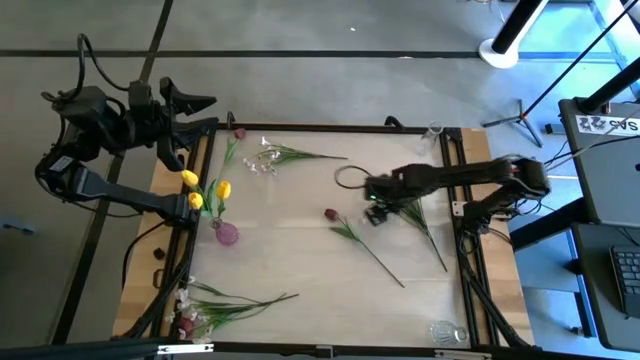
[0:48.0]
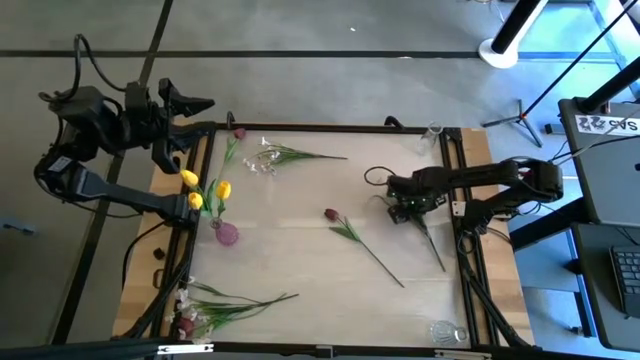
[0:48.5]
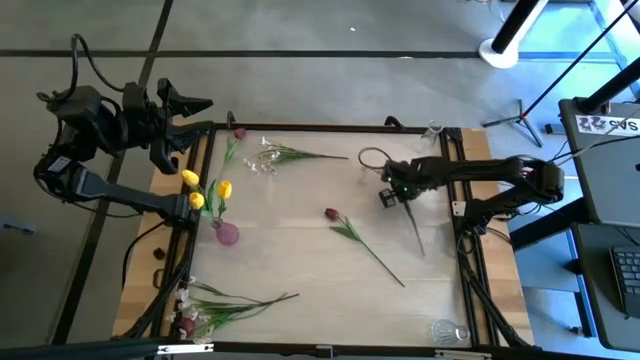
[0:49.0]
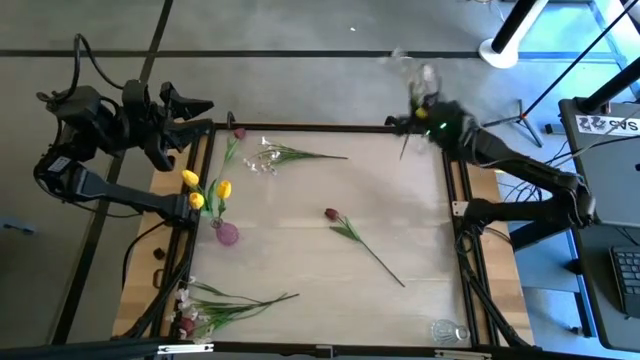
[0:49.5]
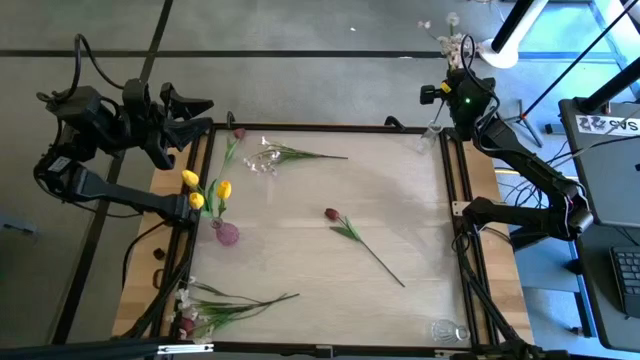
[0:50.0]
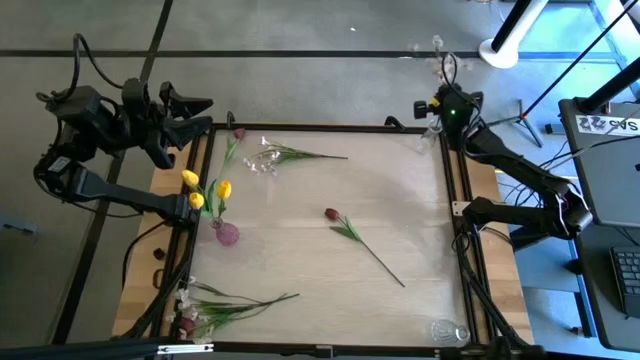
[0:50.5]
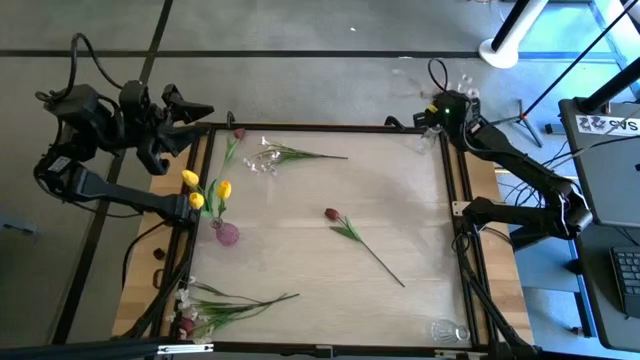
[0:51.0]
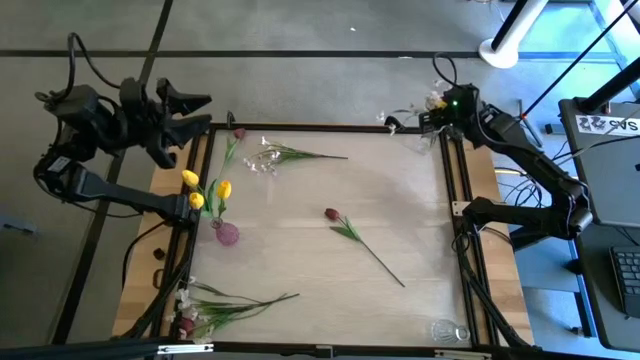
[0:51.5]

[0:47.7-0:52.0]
Task: Sort flowers into vase by color
Put the middle right white flowers into the top transparent flower vase

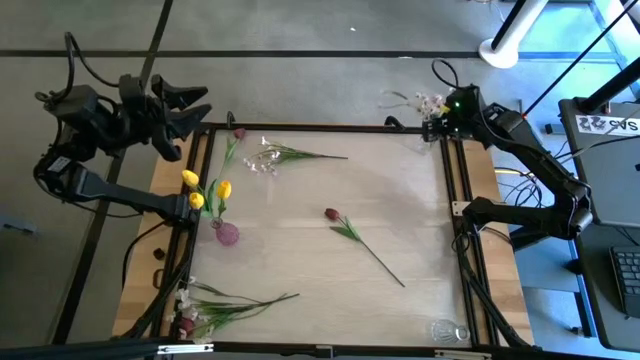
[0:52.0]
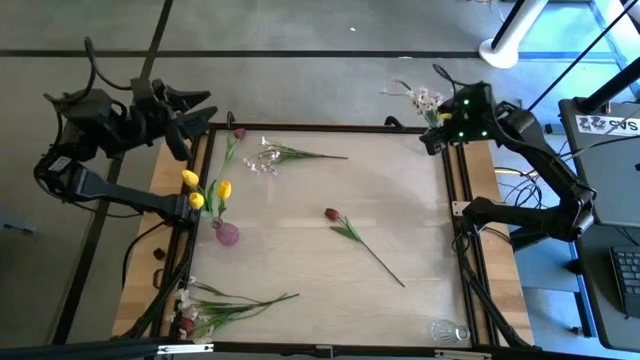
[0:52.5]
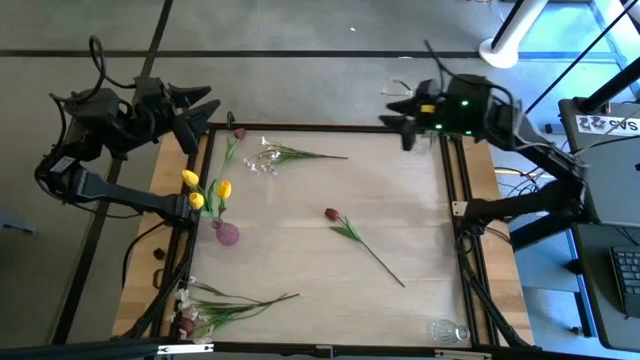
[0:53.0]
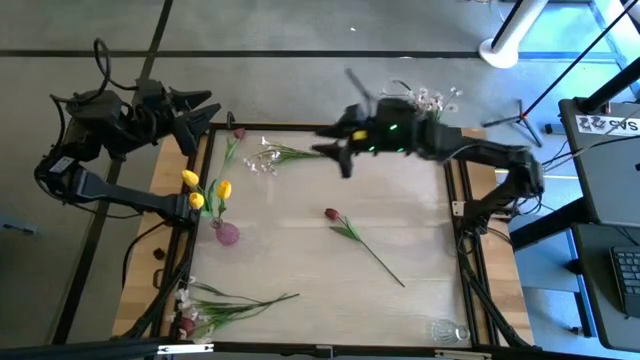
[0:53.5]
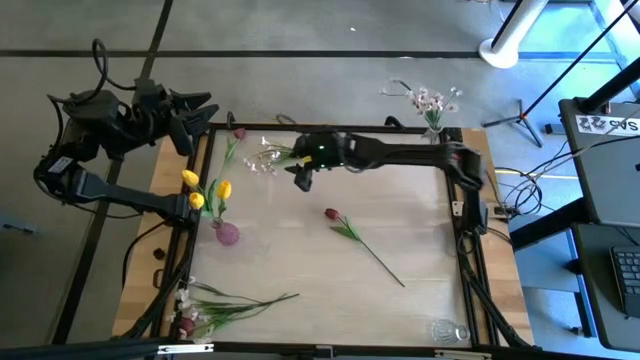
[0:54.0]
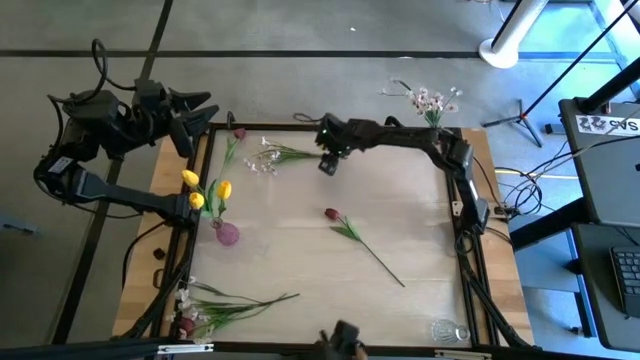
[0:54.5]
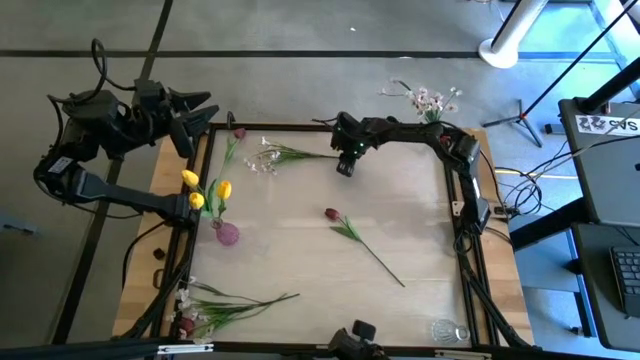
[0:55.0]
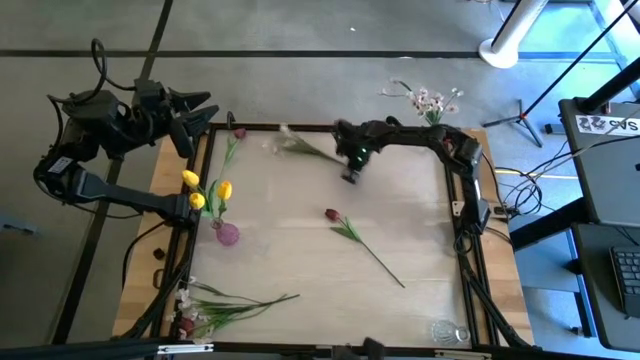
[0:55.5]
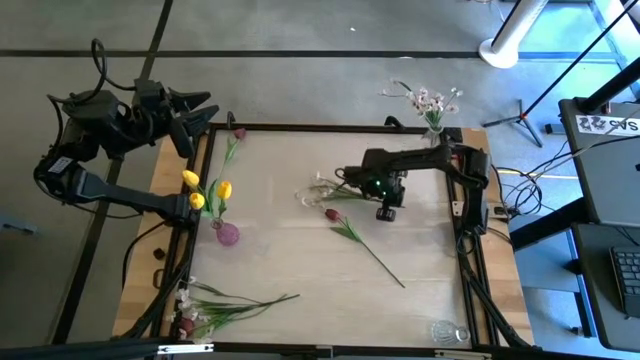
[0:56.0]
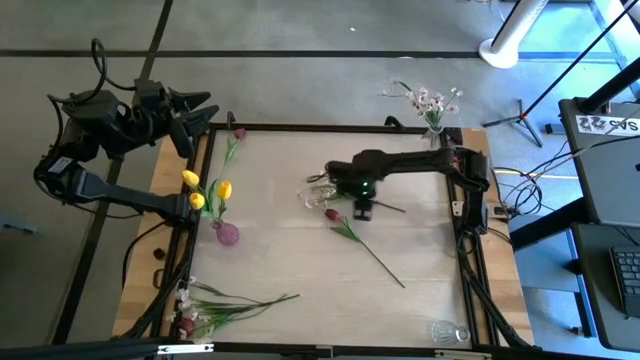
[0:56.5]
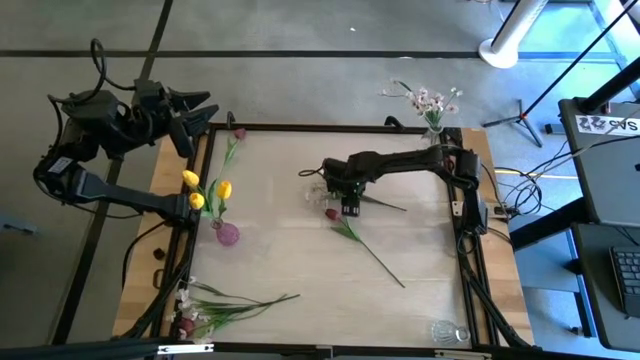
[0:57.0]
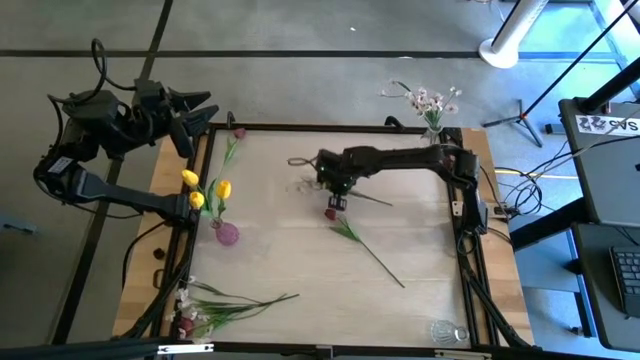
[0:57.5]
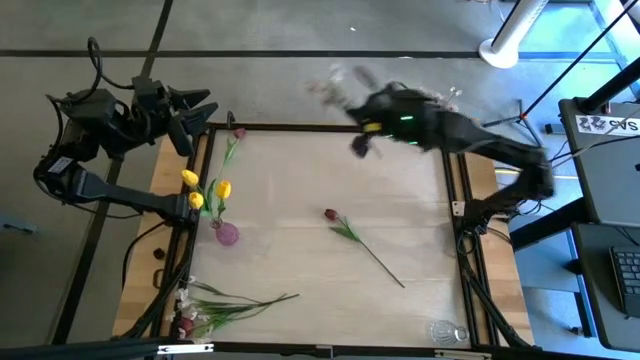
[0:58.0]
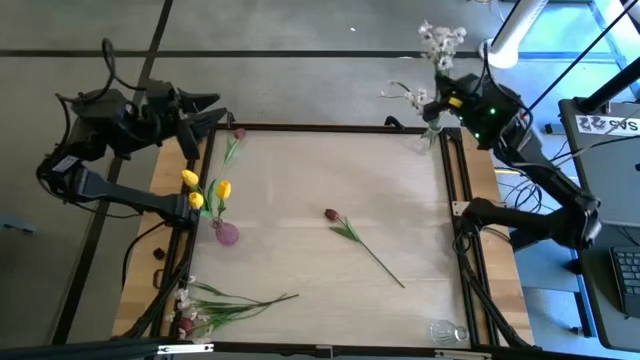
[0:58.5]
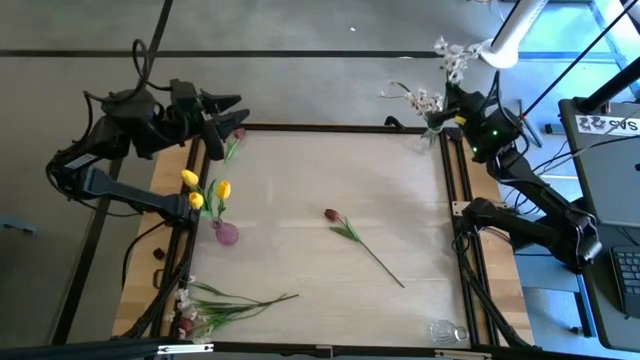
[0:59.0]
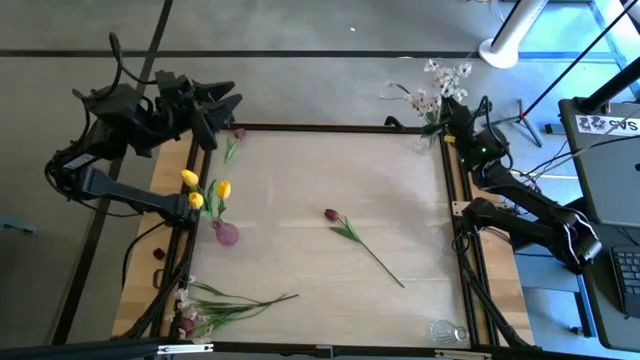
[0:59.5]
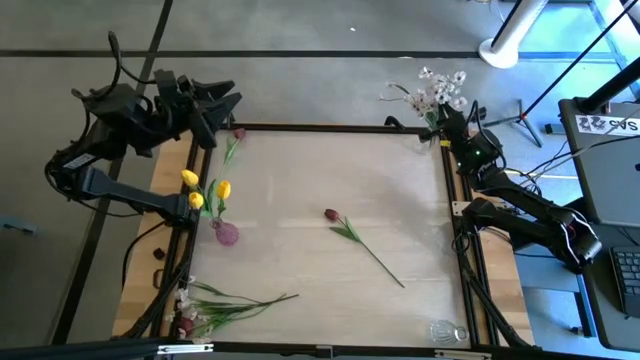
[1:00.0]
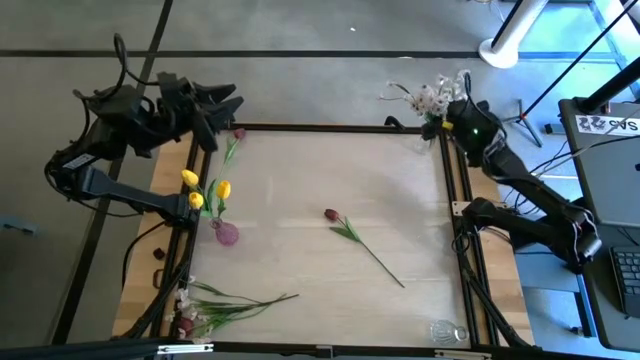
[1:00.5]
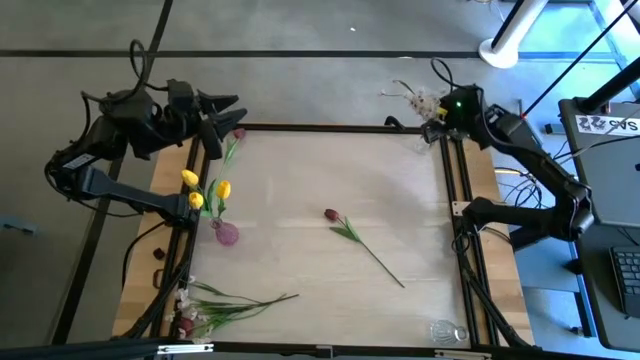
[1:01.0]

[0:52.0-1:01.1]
Put the top white flowers into the top transparent flower vase

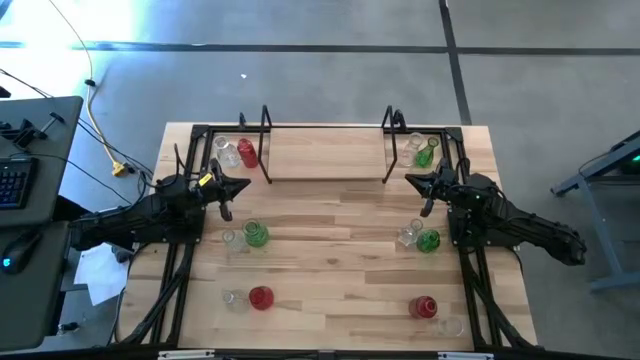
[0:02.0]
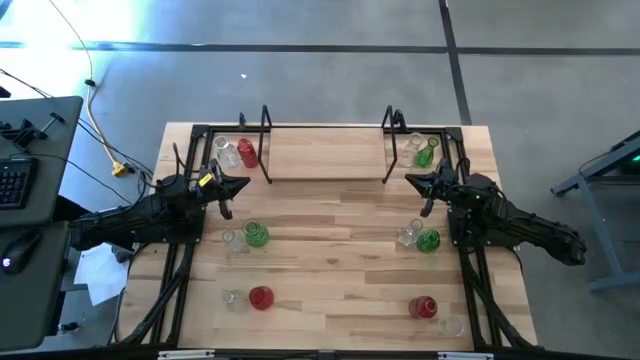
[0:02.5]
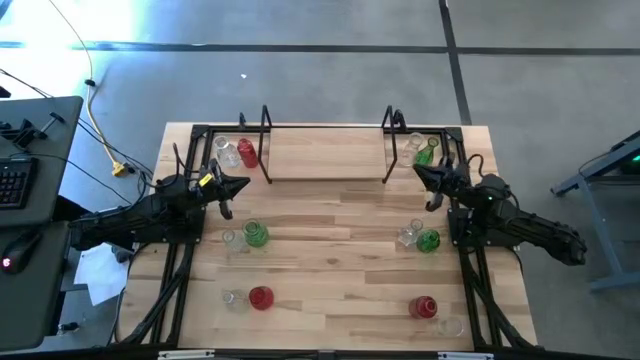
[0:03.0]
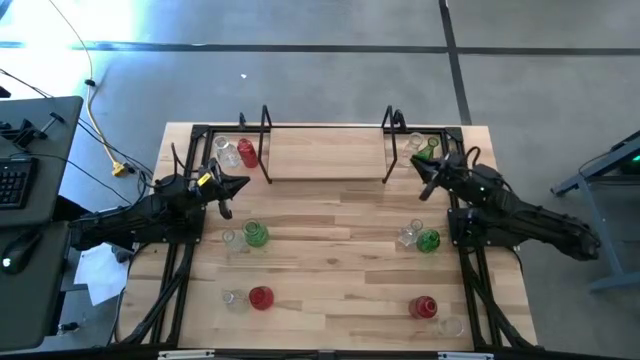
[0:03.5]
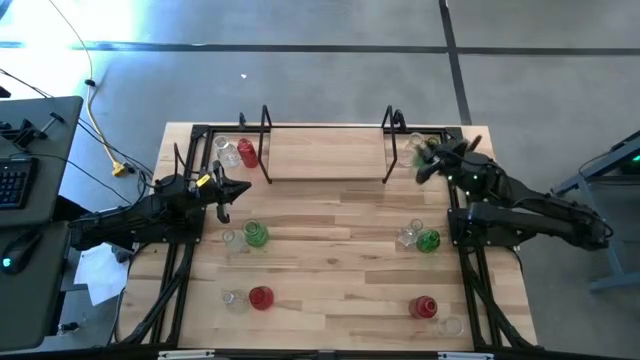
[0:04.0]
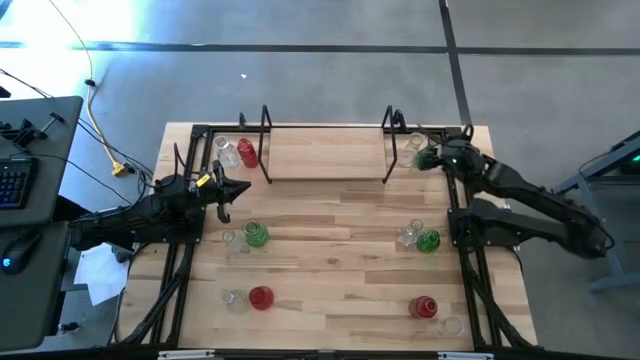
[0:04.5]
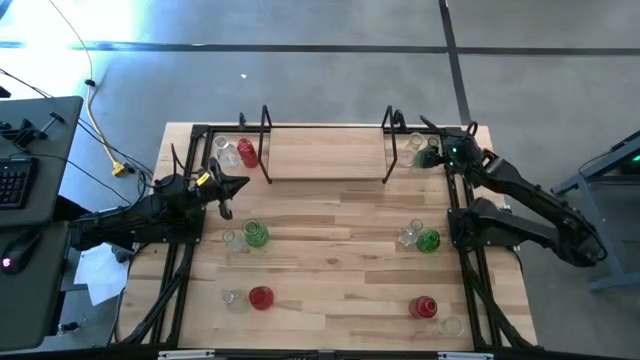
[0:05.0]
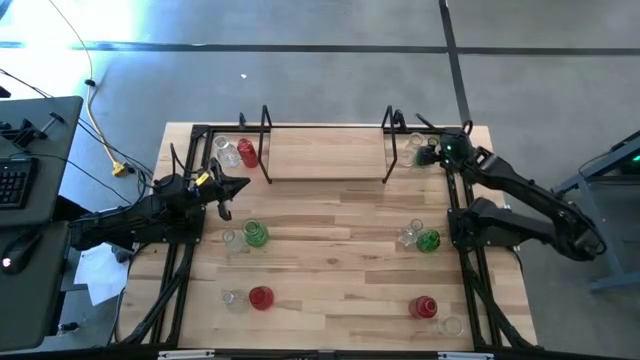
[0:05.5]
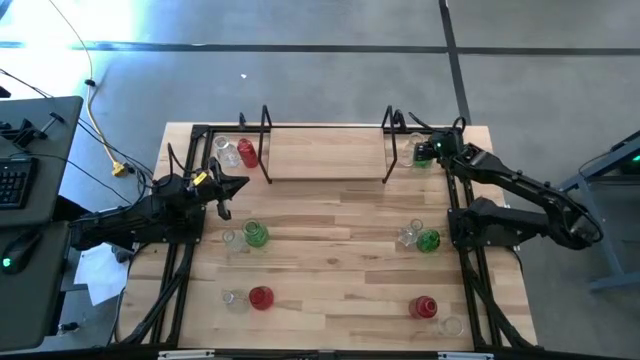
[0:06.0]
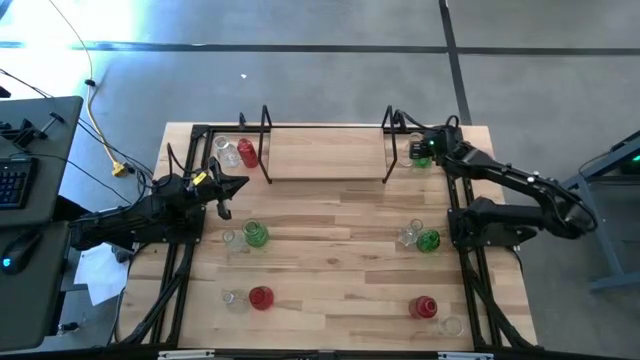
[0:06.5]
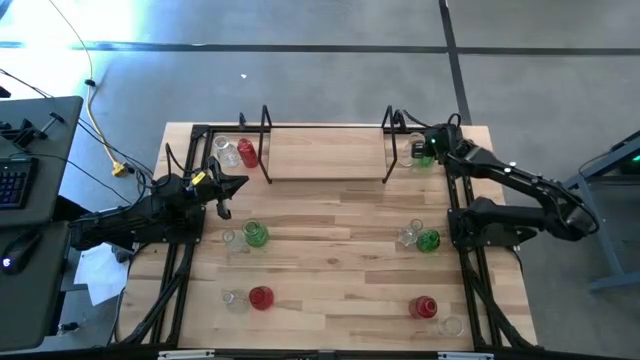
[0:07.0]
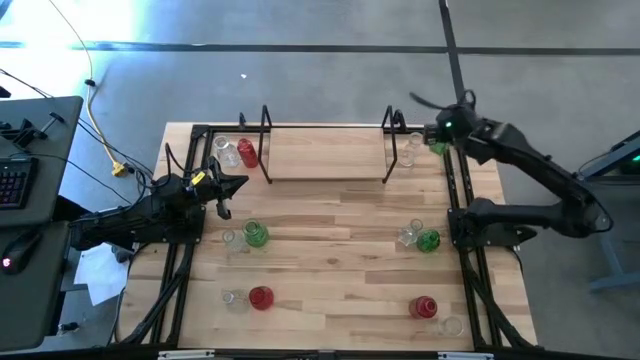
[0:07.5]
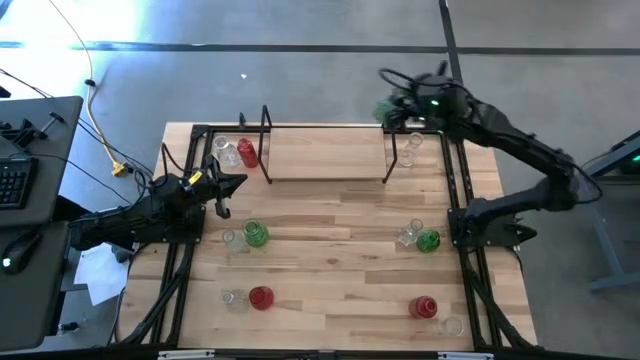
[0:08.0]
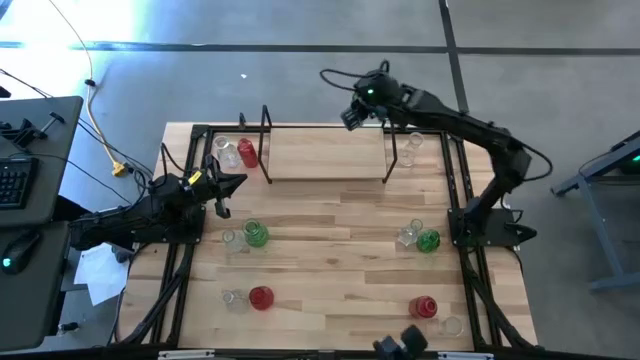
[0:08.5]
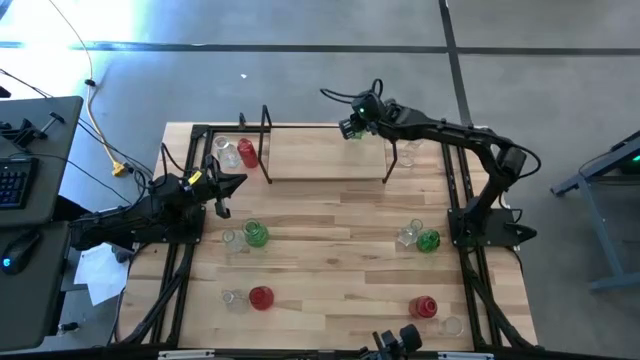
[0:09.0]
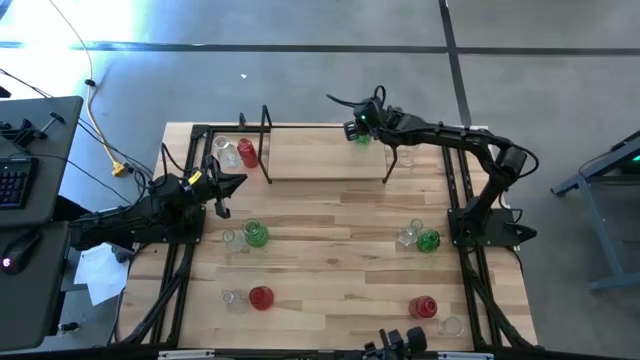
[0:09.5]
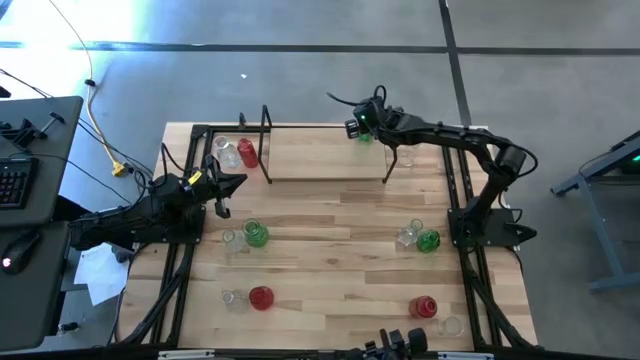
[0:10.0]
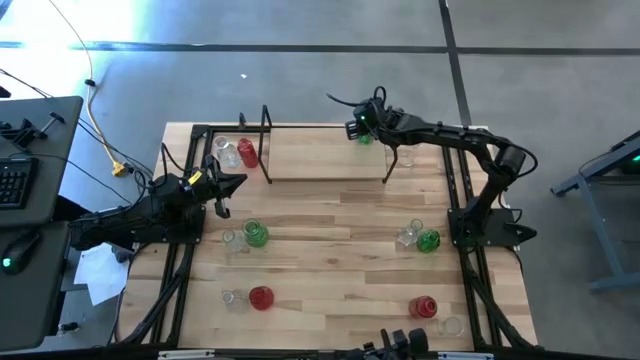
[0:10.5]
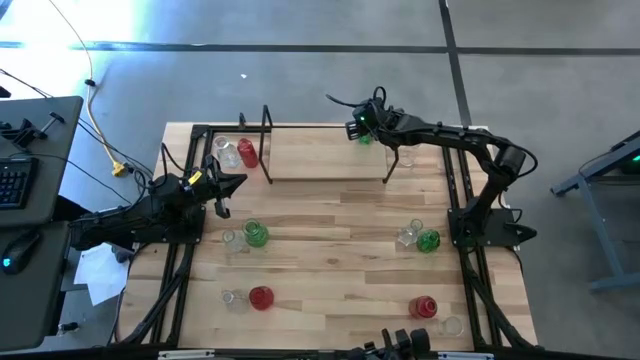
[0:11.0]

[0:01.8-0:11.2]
Task: sort vases onto shelf
Put the top right green vase on the shelf
